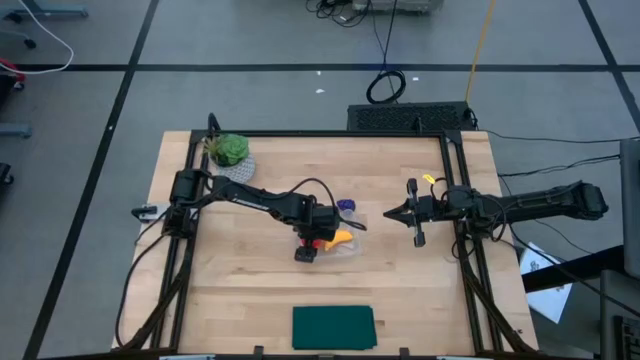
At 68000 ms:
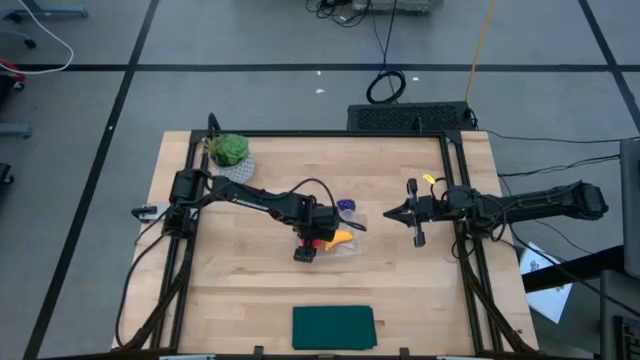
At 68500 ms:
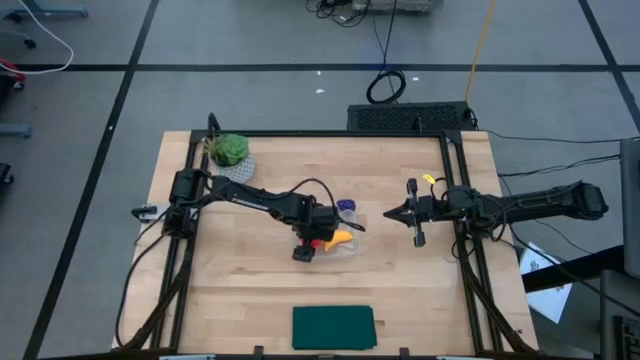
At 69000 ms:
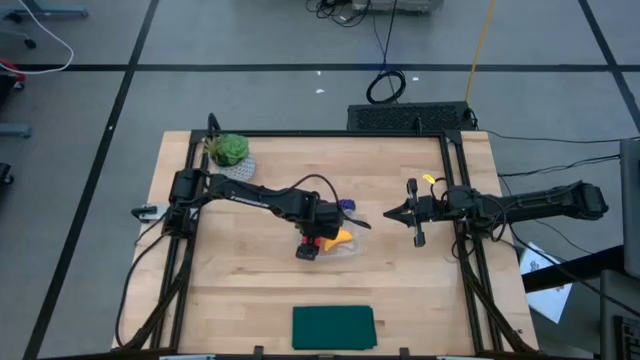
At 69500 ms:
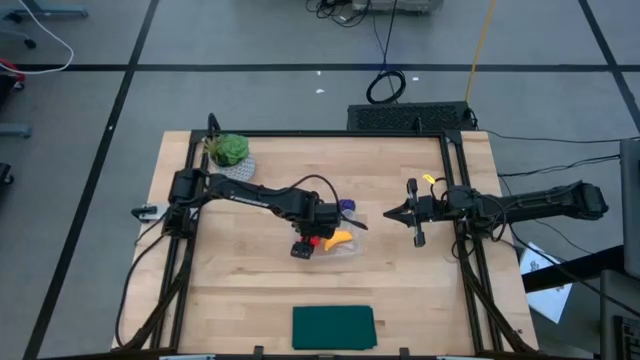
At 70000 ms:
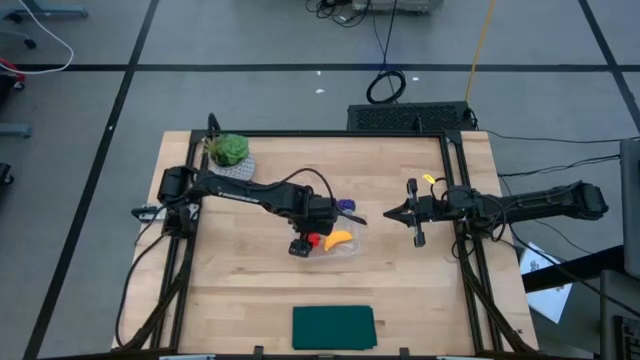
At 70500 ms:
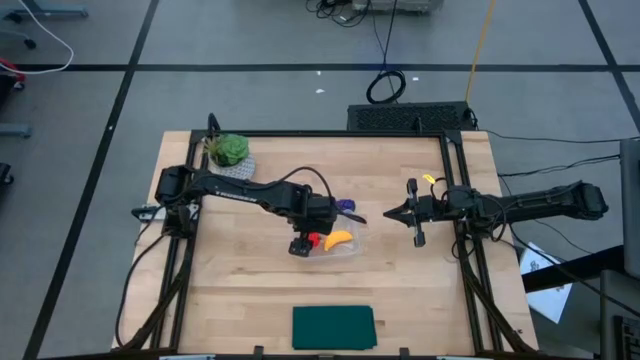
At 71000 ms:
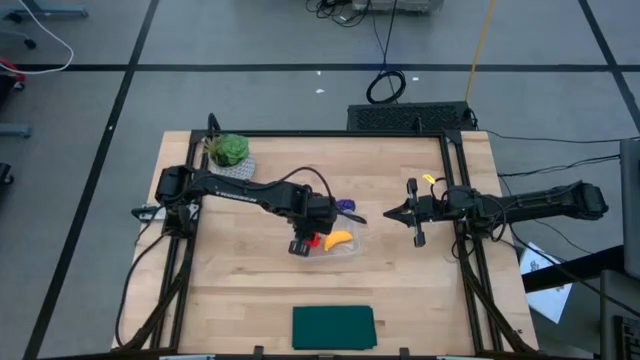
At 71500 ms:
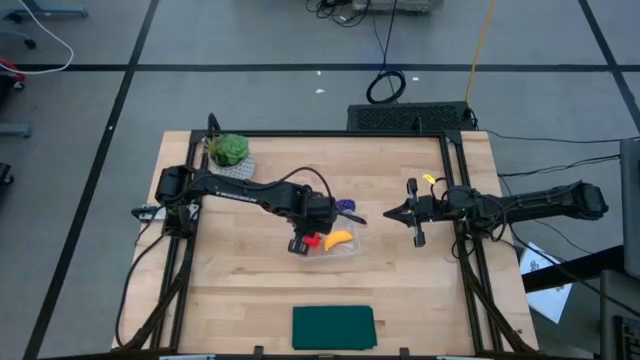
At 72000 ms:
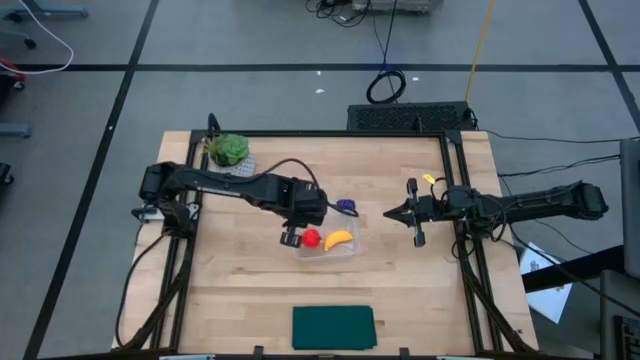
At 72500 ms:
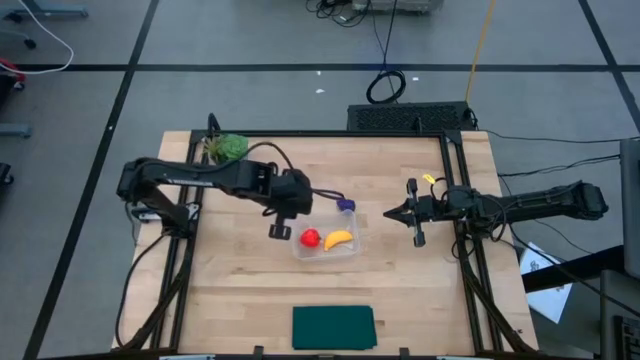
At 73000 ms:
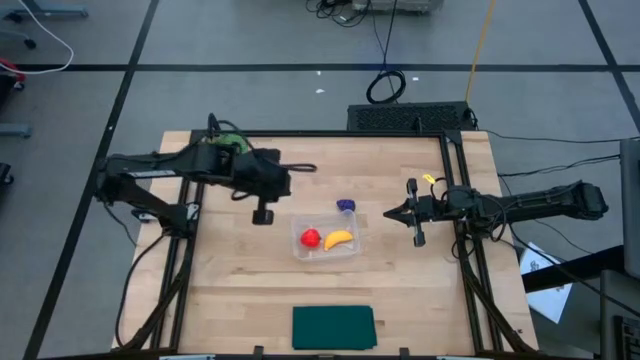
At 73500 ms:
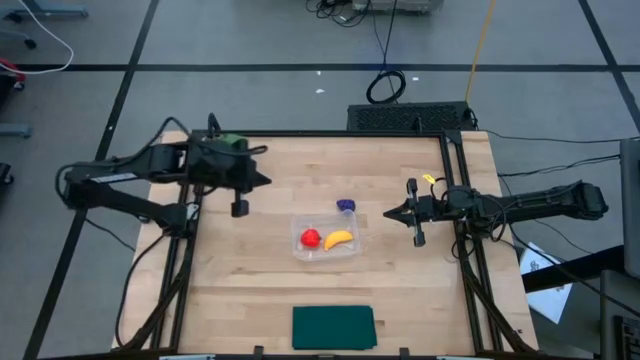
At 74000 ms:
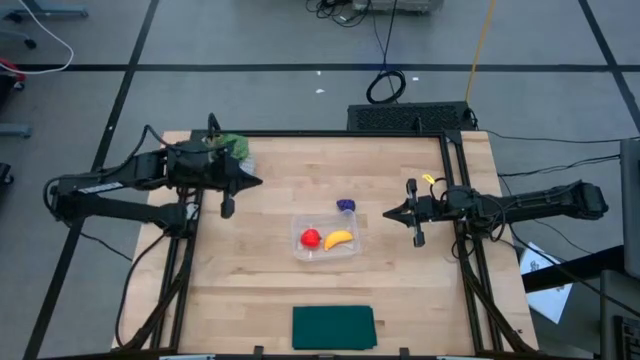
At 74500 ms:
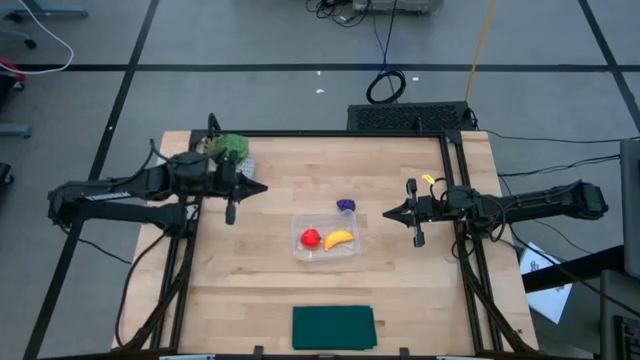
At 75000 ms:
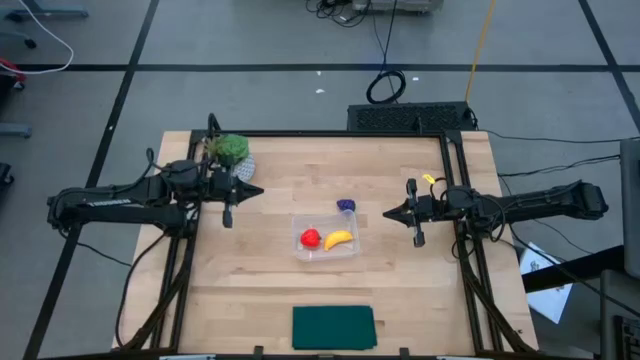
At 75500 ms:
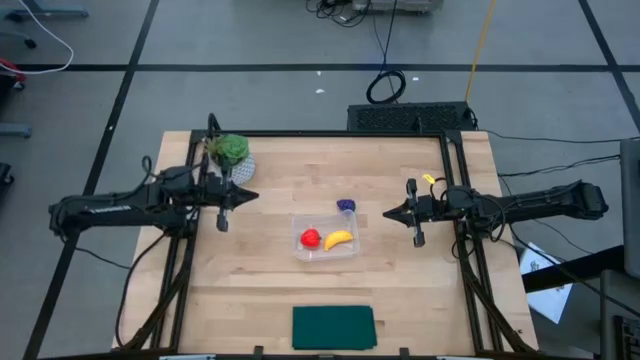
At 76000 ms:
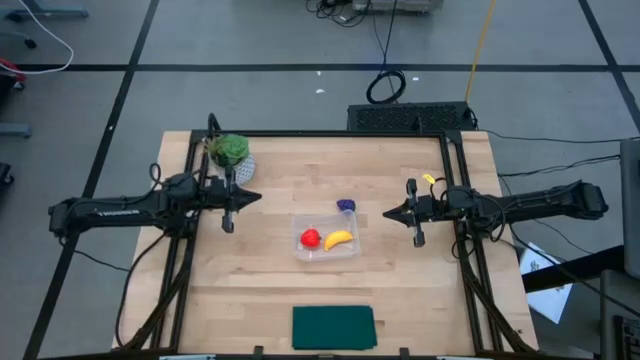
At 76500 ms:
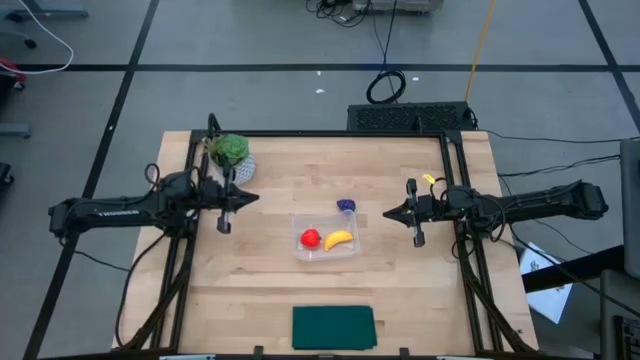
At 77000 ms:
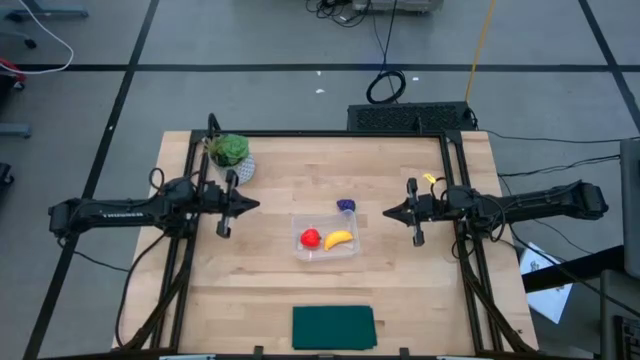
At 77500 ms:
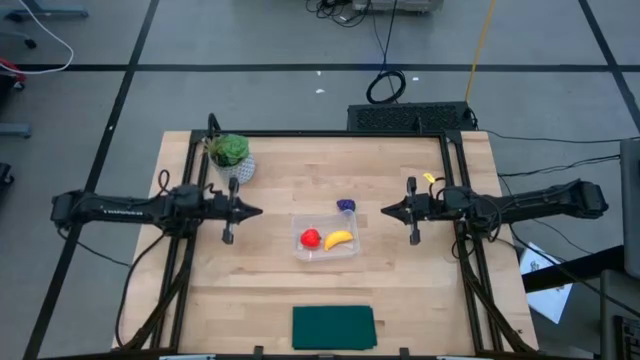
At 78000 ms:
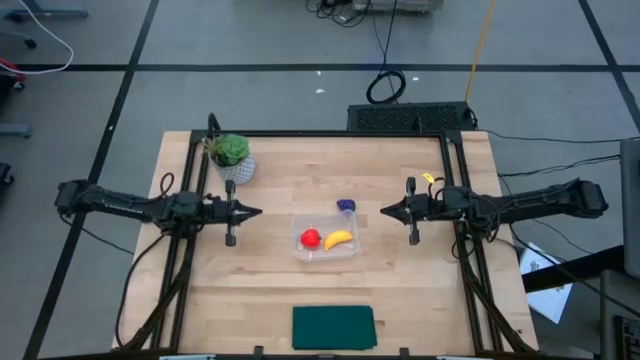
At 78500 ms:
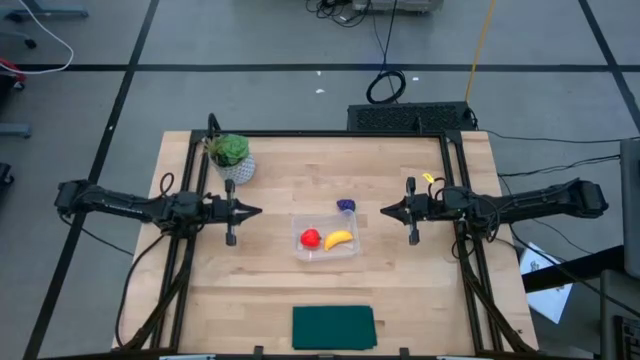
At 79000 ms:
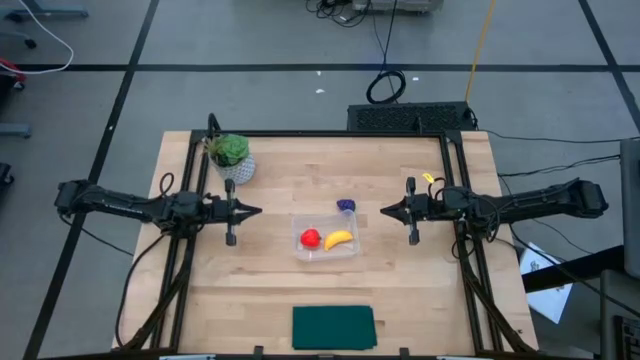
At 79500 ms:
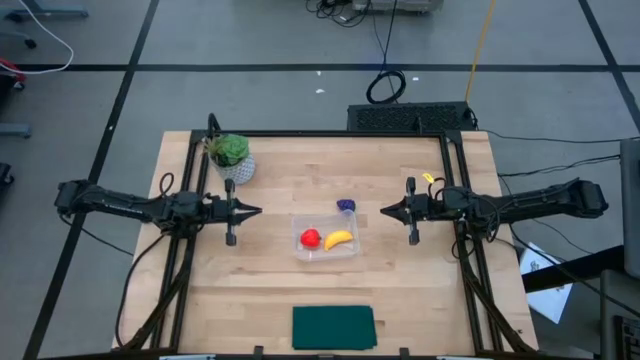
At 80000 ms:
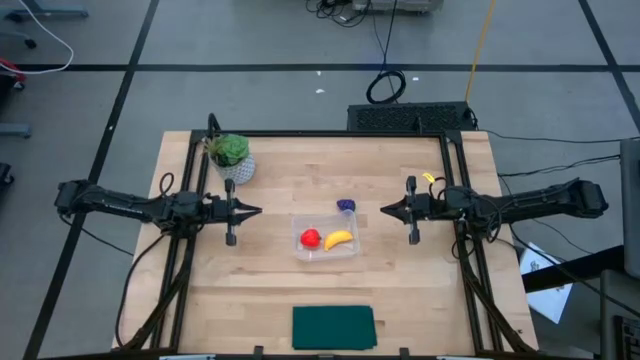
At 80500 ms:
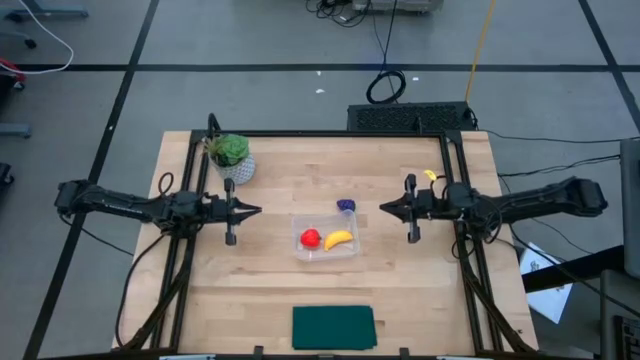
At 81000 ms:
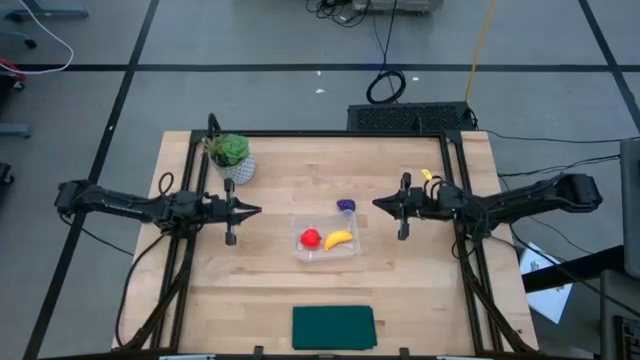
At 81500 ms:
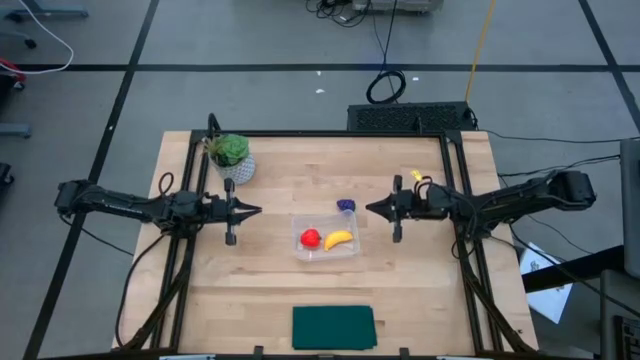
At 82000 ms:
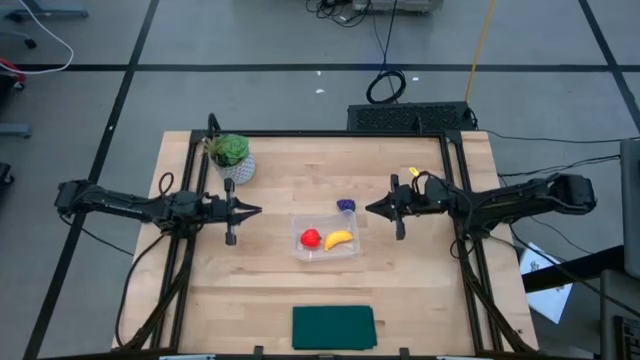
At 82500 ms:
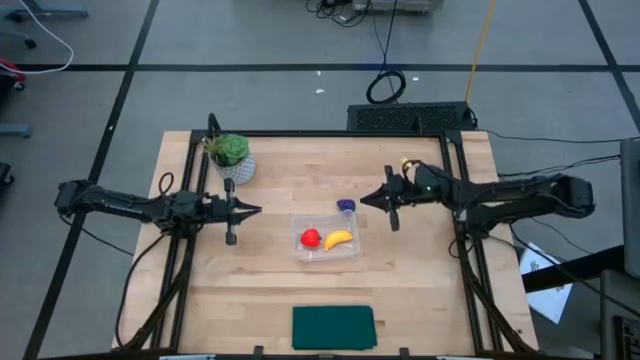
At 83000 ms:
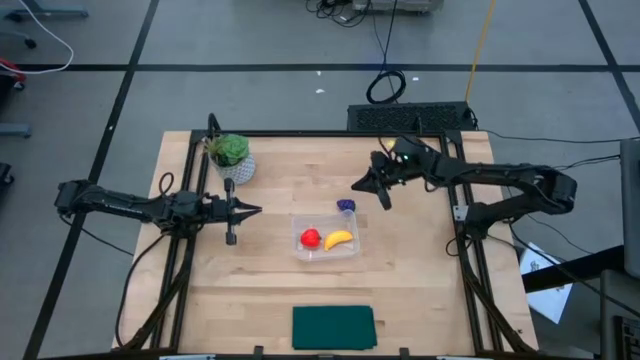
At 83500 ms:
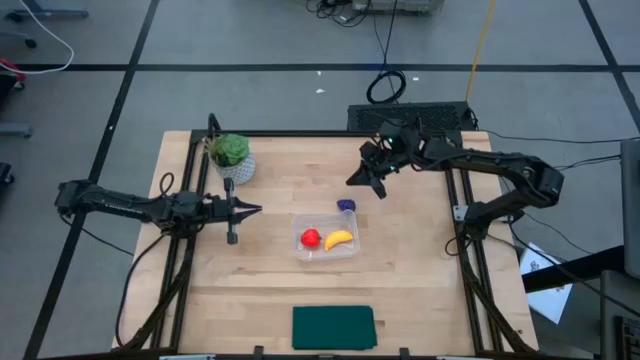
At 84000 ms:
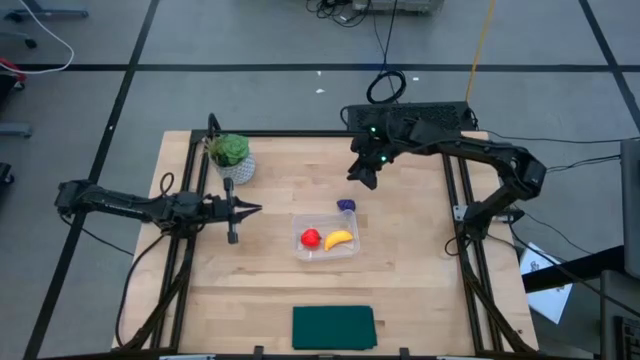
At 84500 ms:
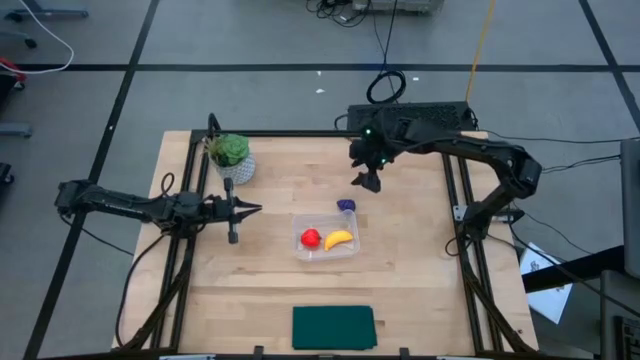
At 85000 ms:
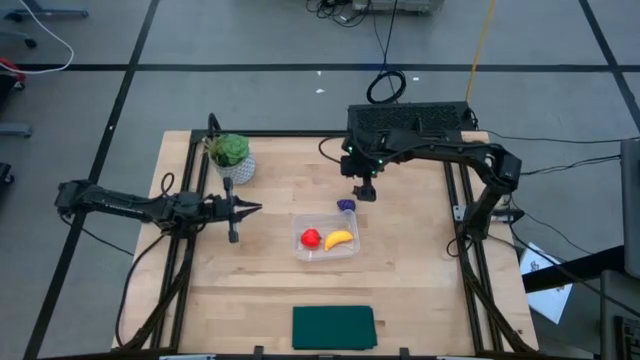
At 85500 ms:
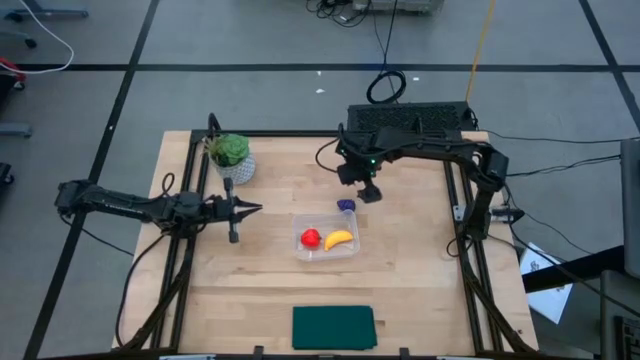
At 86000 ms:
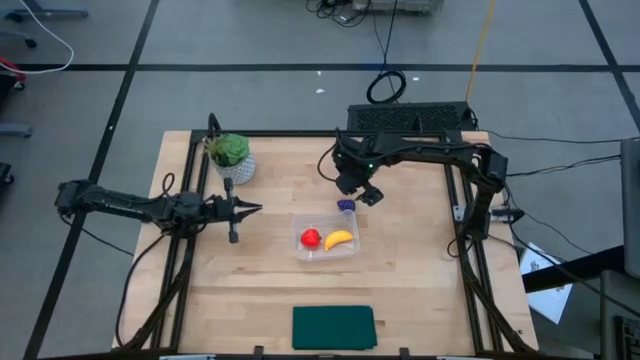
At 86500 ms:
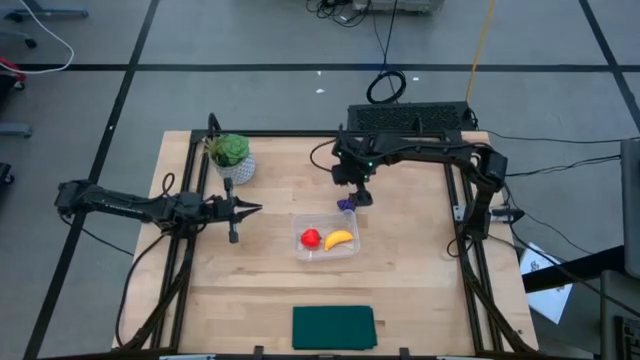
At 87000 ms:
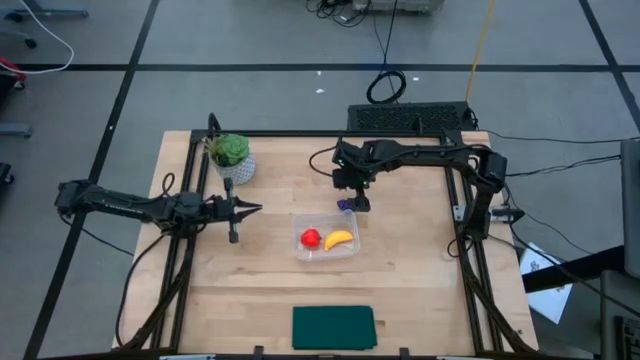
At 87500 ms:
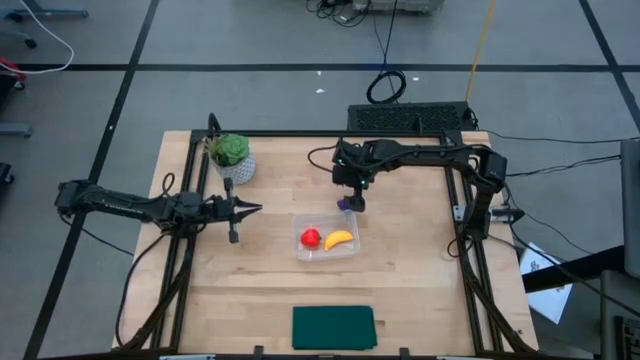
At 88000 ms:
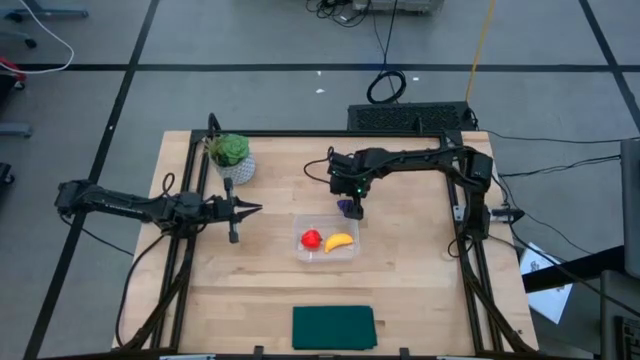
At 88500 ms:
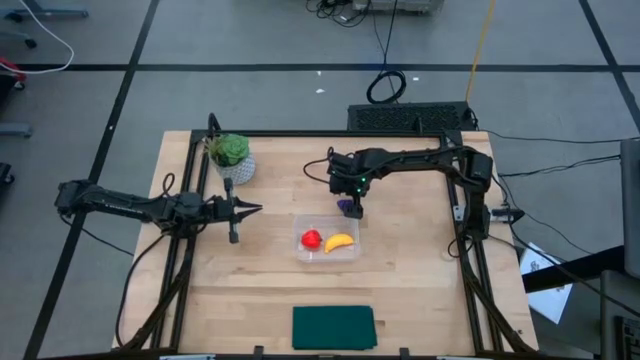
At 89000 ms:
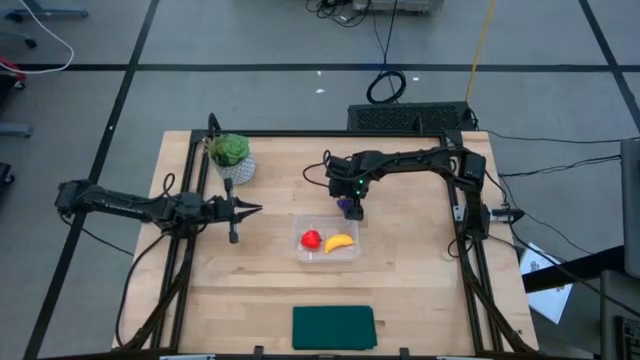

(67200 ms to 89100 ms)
Task: Pick and placing Produce into tupperware
Put the black berry into transparent bin
